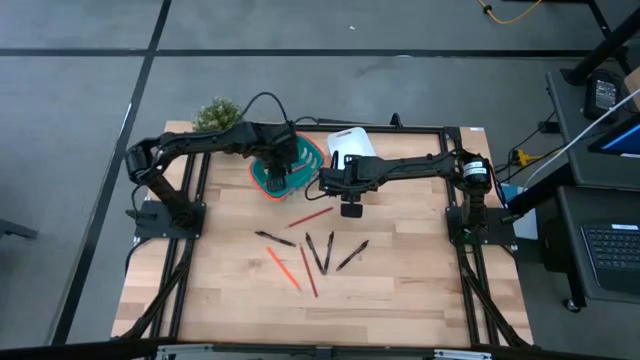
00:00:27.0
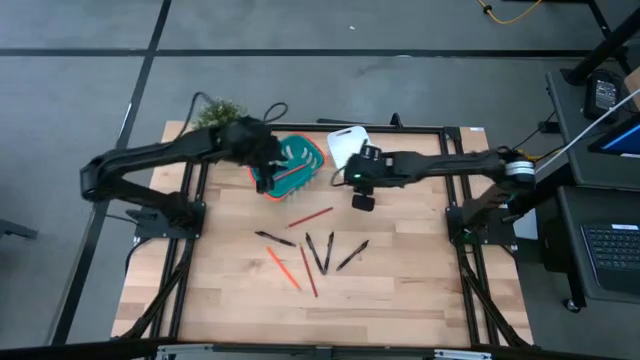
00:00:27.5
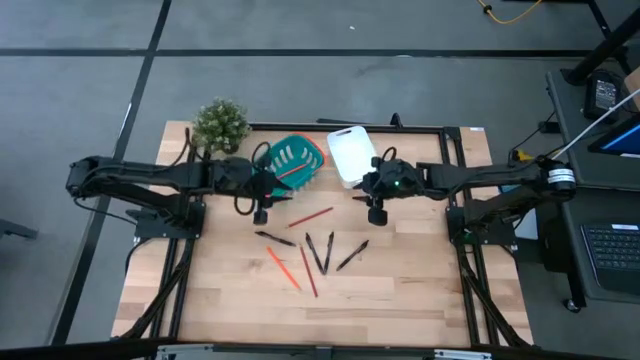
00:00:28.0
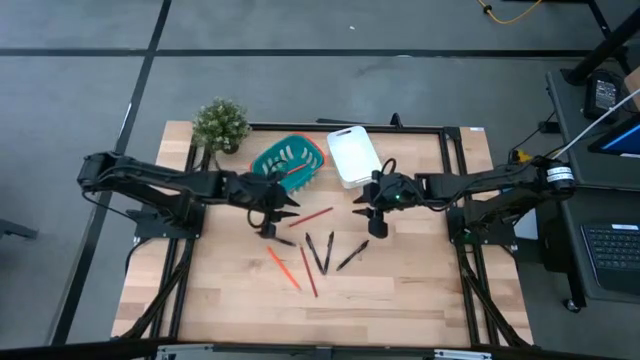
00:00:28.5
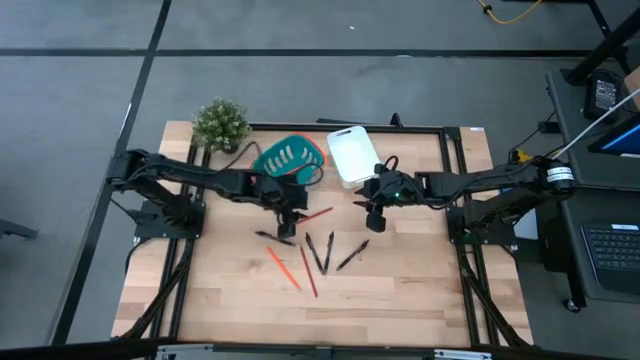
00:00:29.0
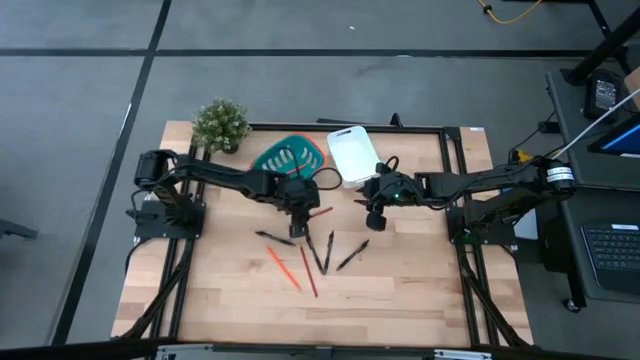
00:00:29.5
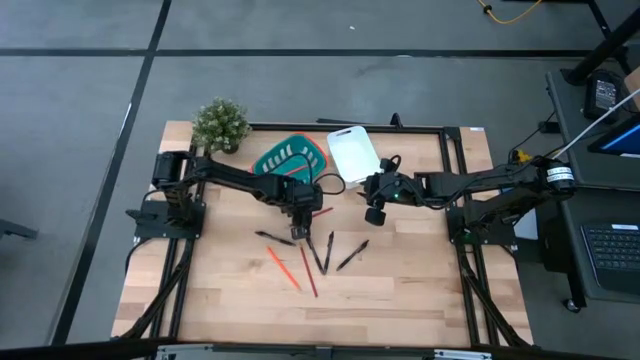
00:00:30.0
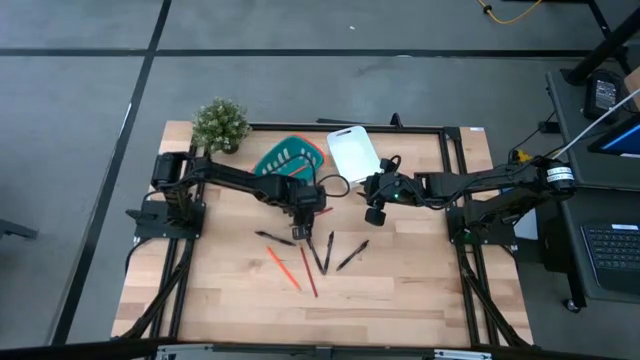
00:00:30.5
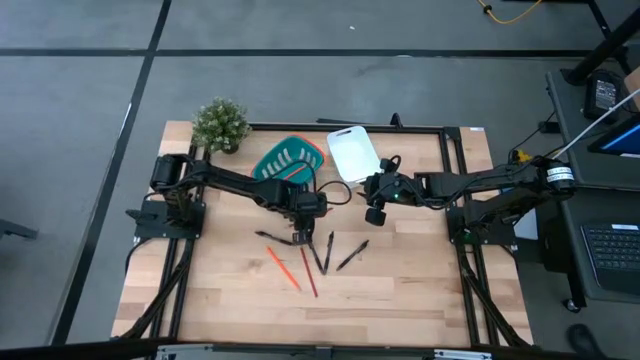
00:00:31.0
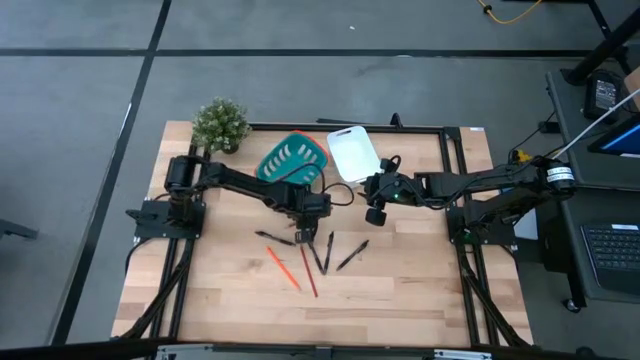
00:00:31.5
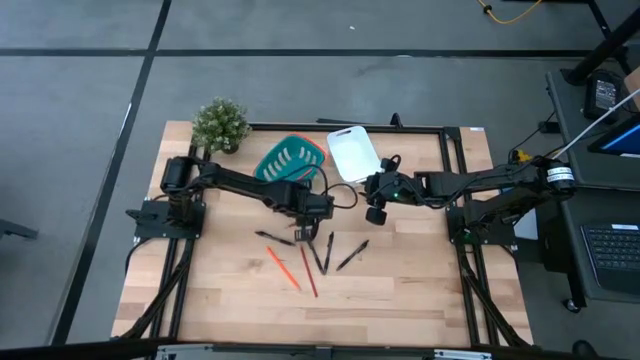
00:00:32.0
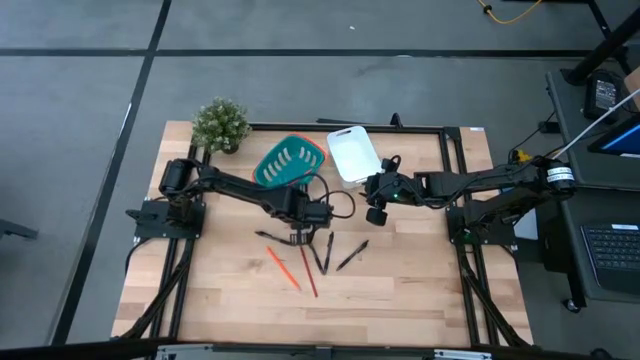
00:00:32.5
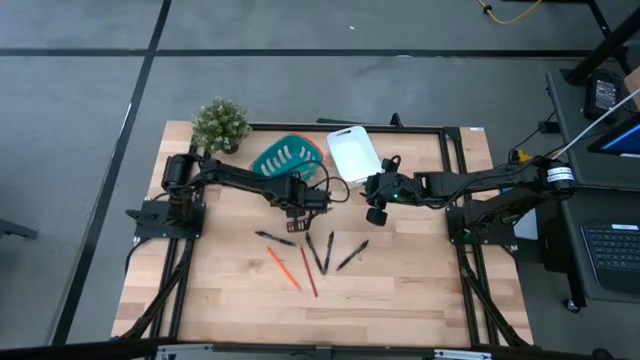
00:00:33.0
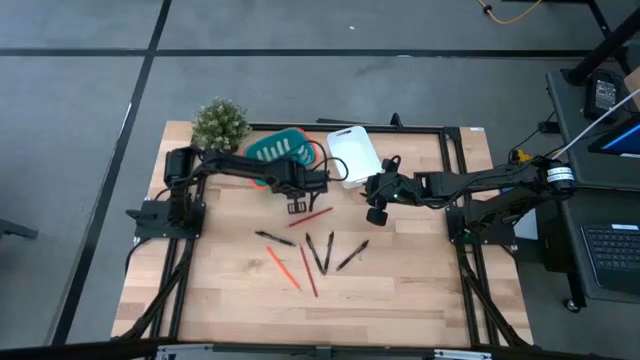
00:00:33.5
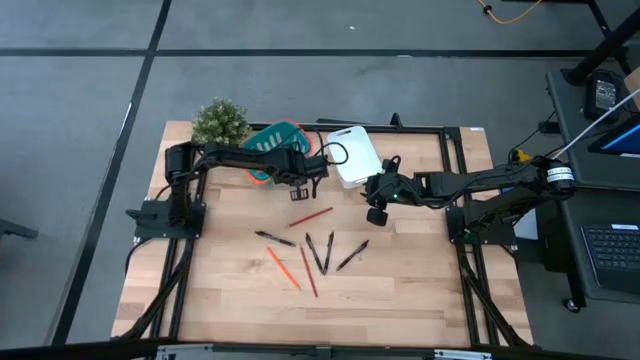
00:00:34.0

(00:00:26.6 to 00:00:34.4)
Task: Sort pens & pencils
Adjust the green basket

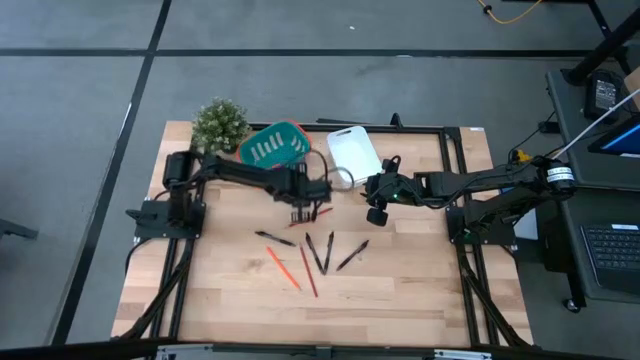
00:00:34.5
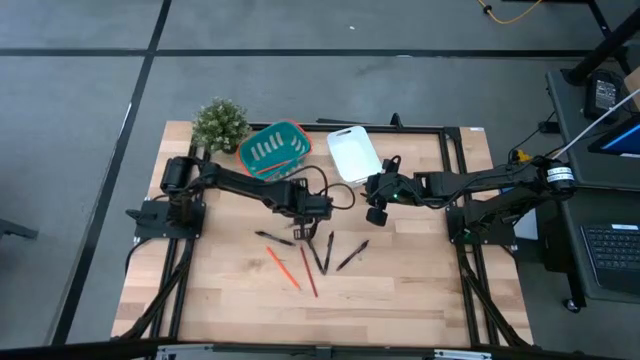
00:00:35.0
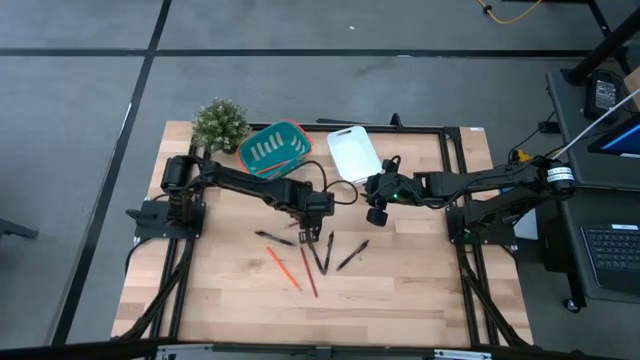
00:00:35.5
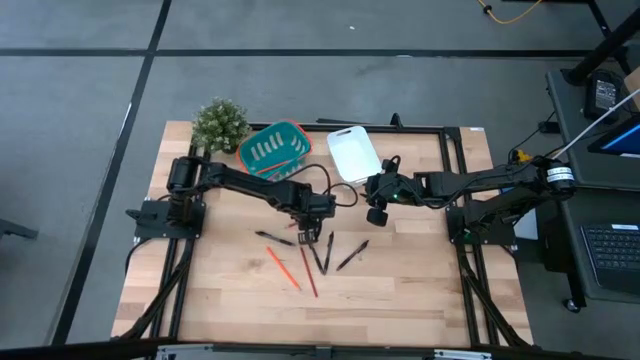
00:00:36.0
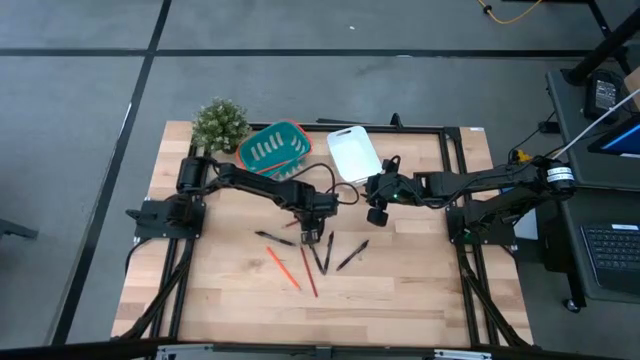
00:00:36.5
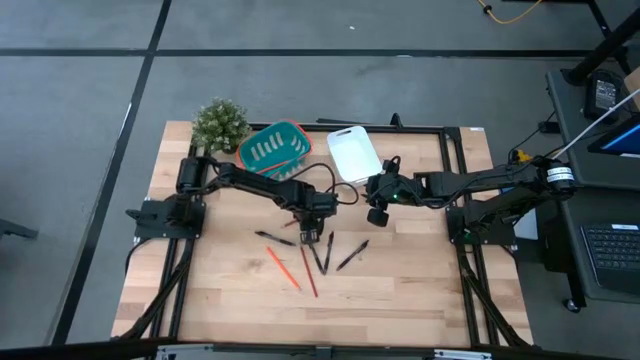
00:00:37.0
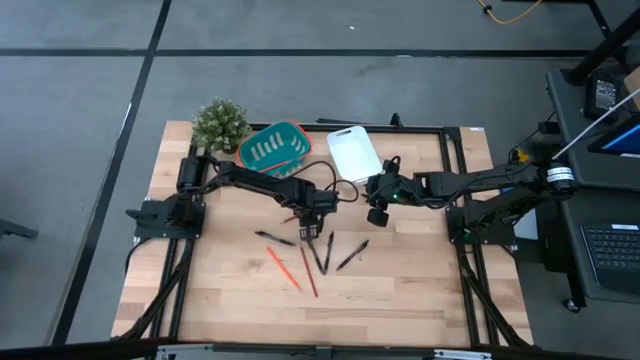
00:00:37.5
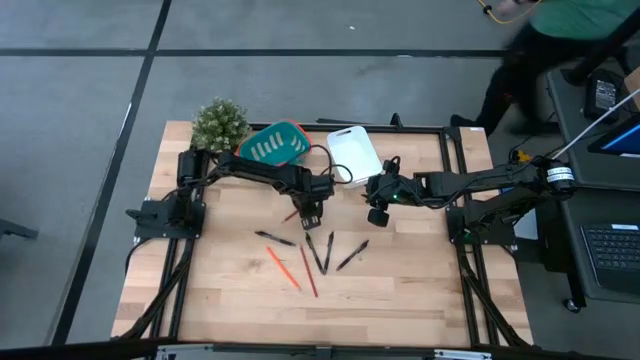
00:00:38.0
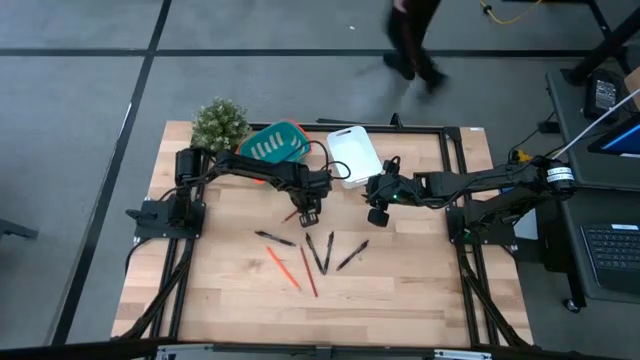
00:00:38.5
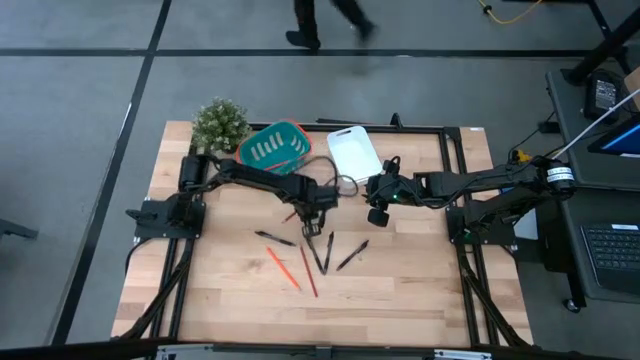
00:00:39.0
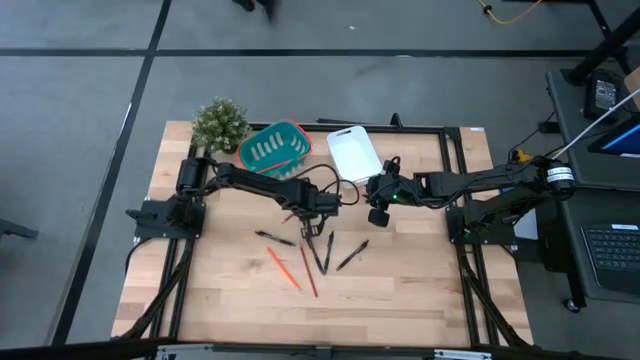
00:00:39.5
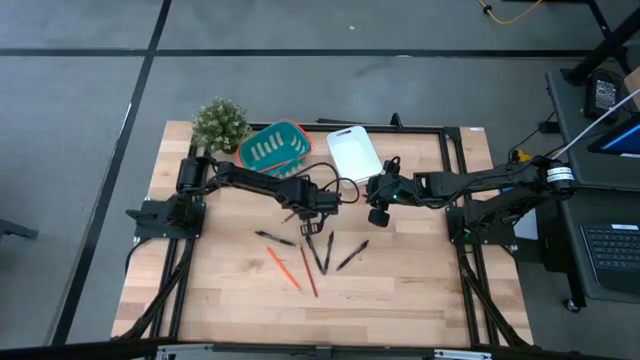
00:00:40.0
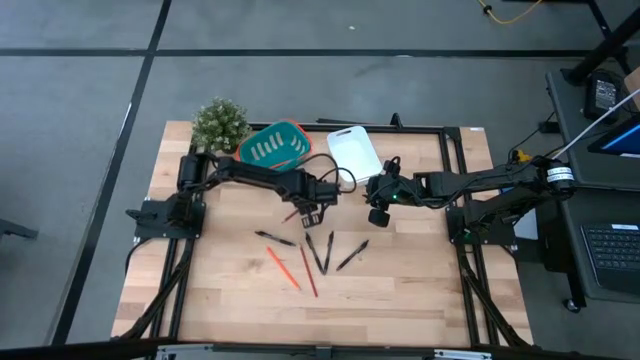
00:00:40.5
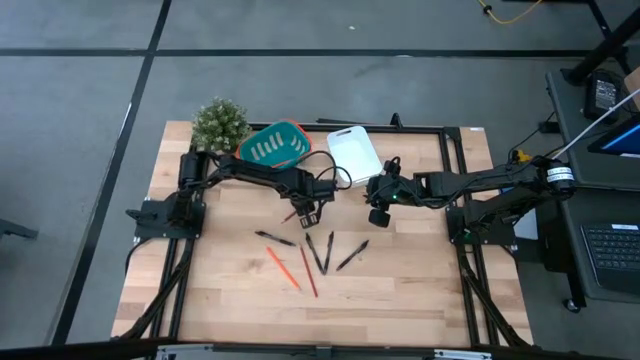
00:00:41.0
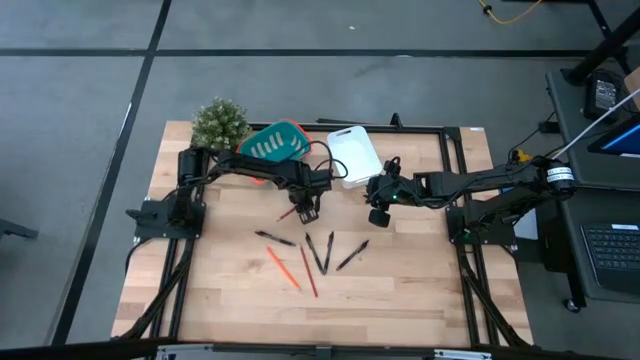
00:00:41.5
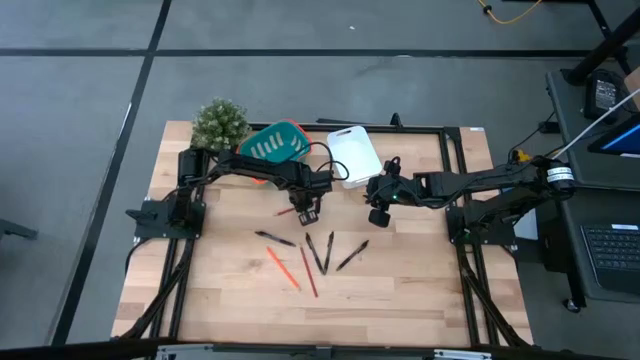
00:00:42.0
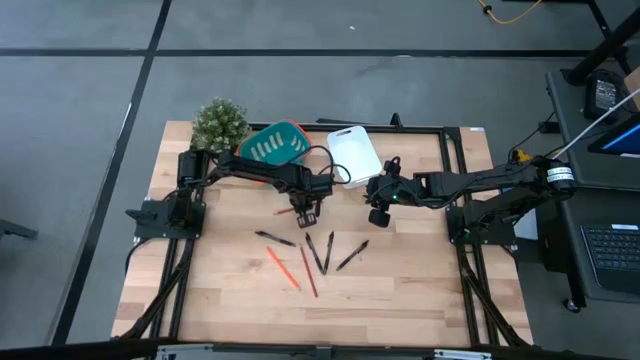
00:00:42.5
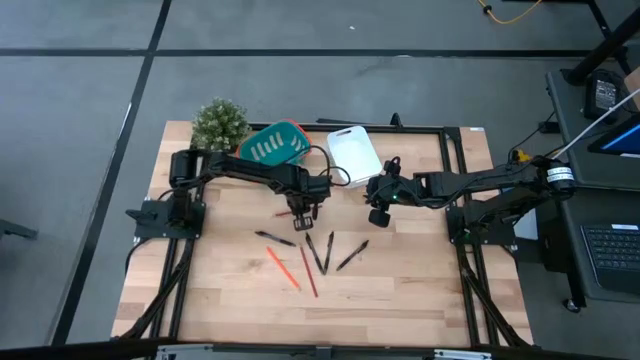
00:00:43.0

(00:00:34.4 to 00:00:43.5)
Put the red pencil into the green basket

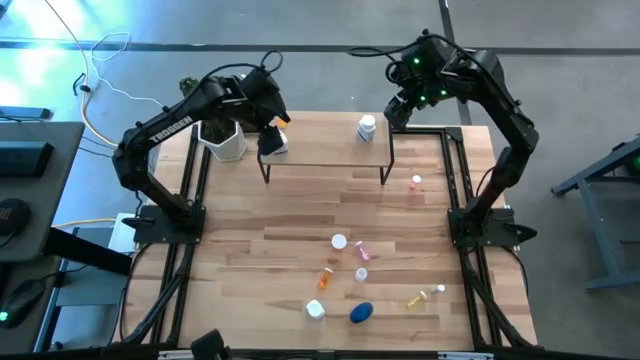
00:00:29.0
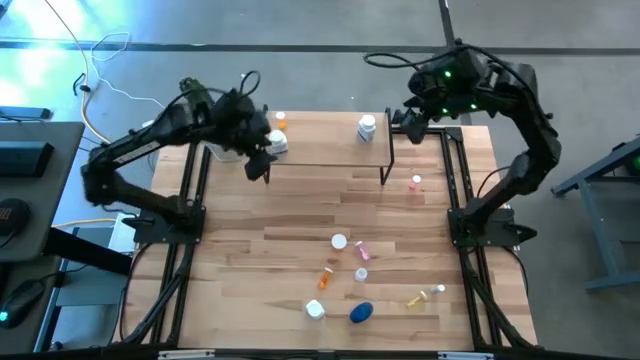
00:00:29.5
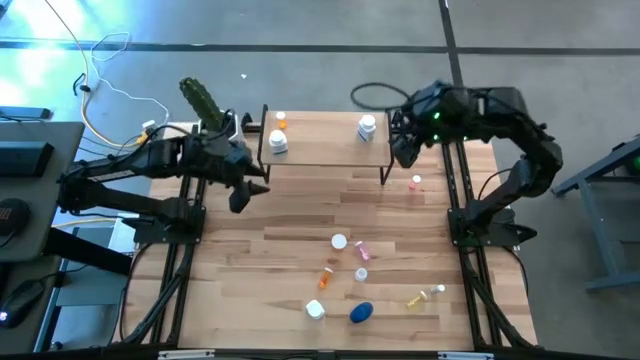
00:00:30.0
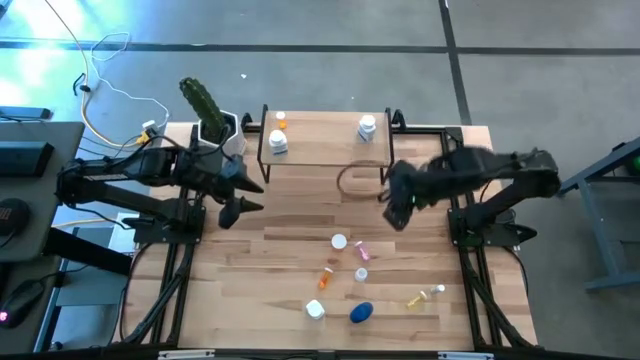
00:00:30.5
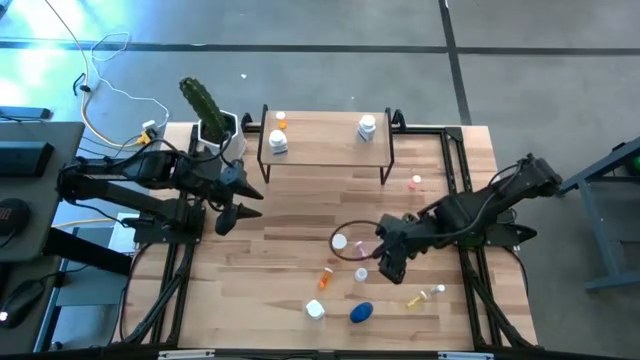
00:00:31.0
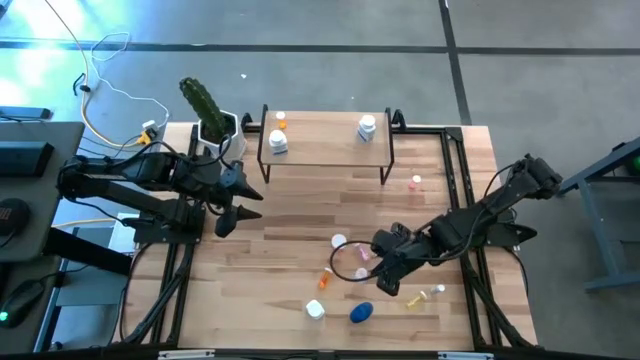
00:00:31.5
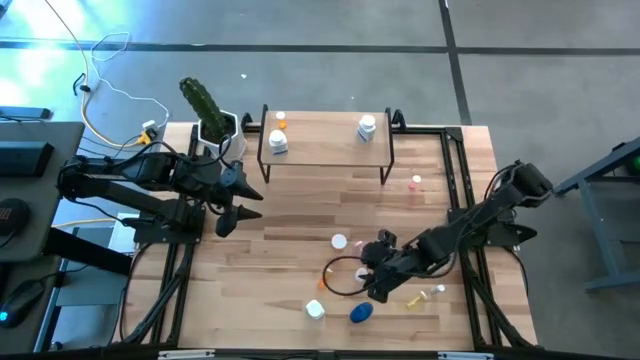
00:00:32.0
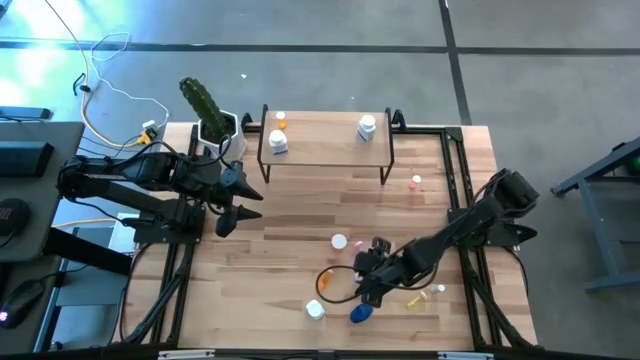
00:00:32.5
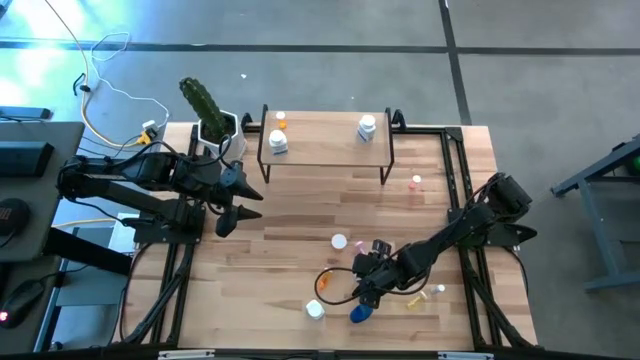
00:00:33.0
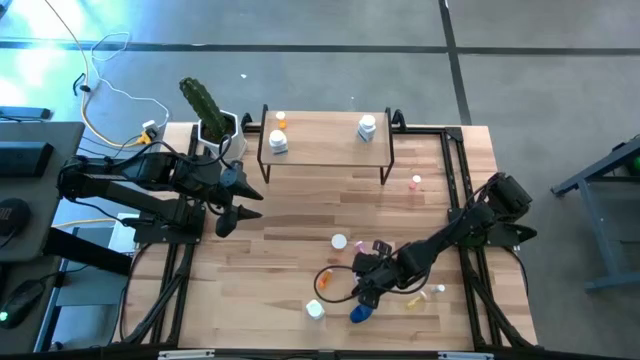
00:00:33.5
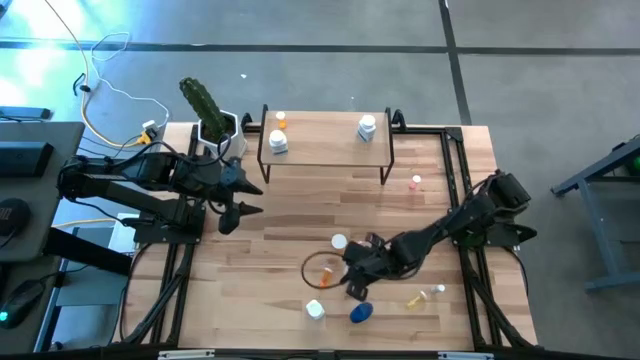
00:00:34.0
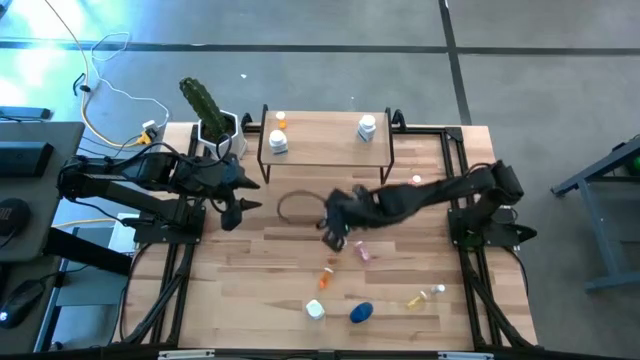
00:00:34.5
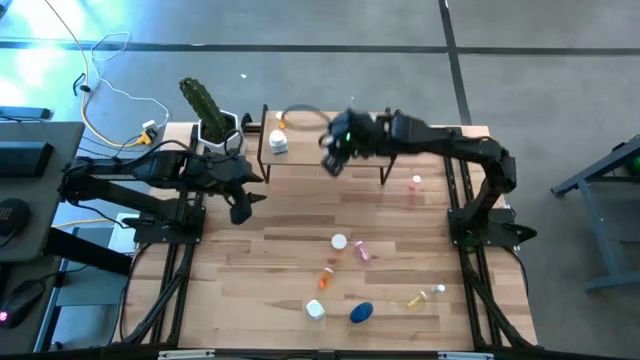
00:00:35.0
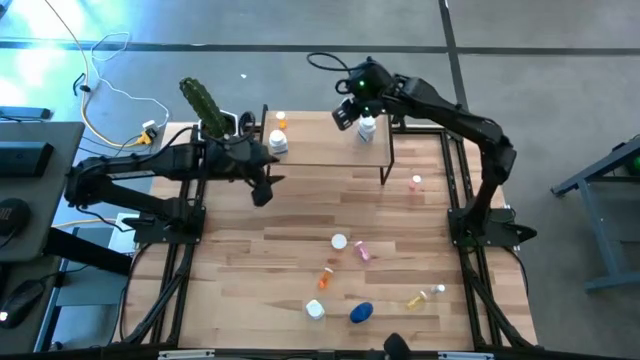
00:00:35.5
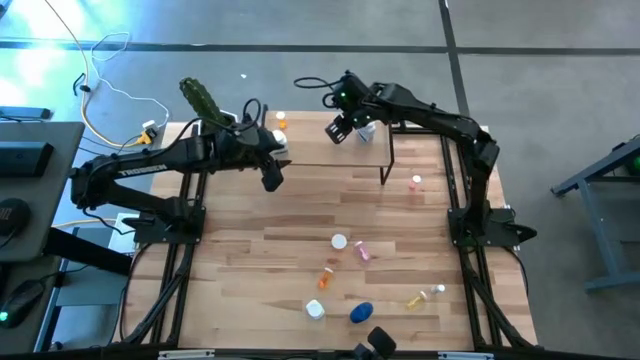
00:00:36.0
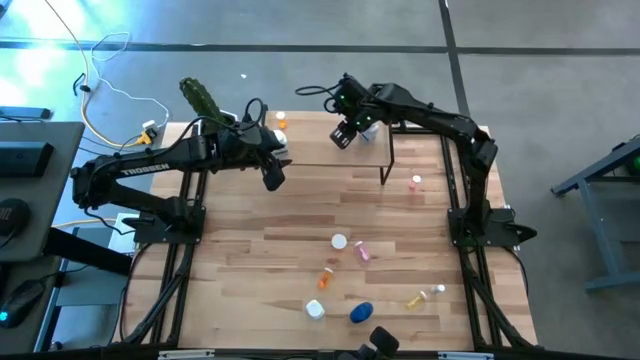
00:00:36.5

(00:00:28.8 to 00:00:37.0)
Task: Pick and place medicine bottles onto shelf by color
Put the transparent pill bottle on the shelf
